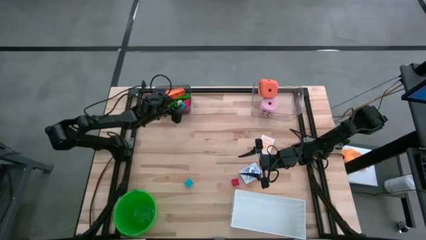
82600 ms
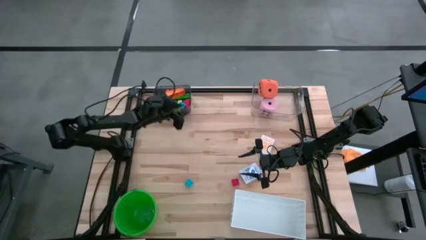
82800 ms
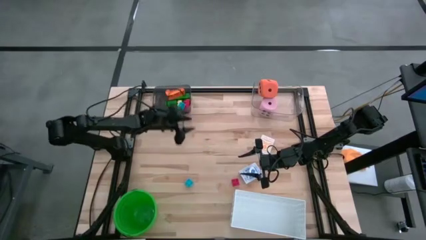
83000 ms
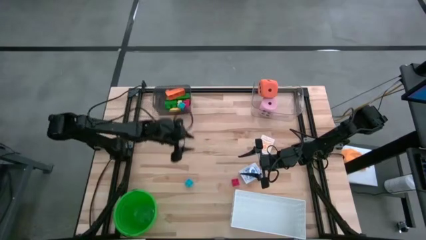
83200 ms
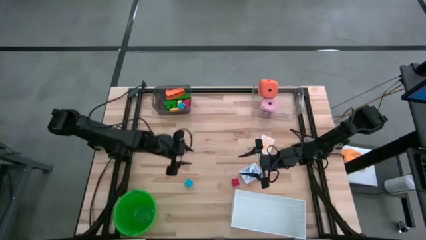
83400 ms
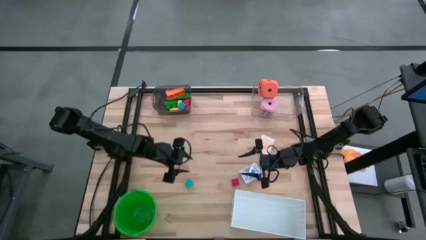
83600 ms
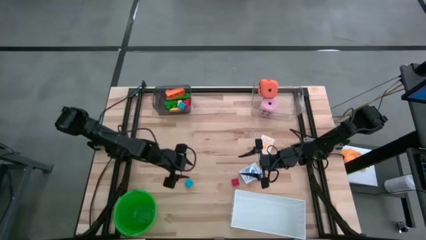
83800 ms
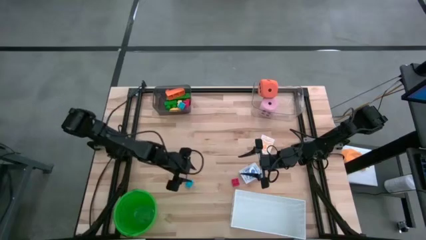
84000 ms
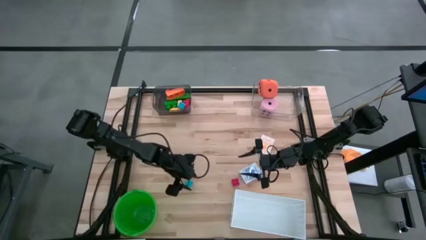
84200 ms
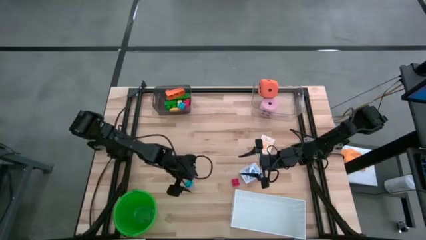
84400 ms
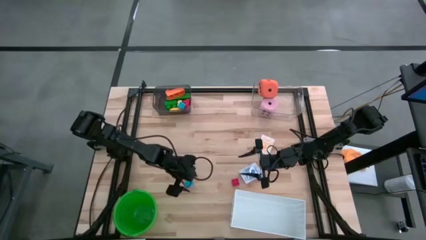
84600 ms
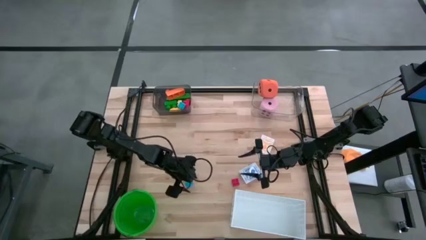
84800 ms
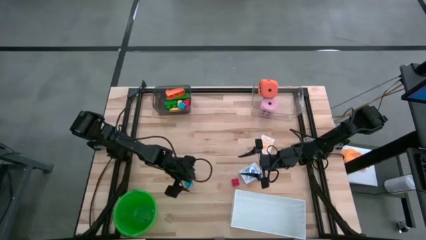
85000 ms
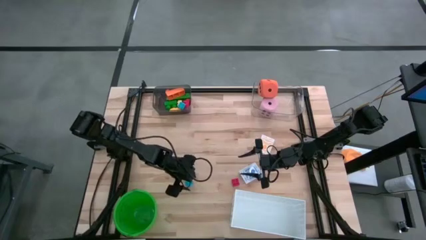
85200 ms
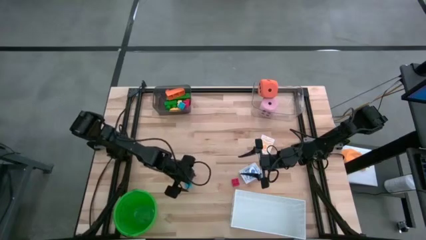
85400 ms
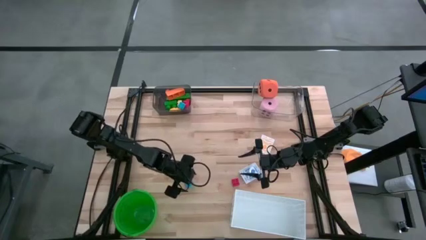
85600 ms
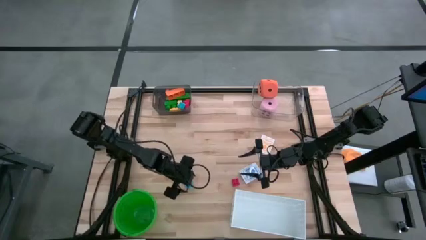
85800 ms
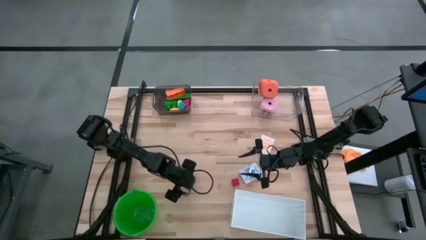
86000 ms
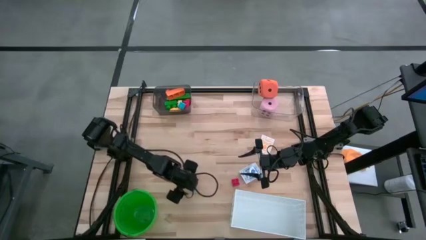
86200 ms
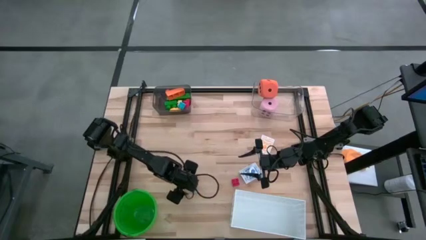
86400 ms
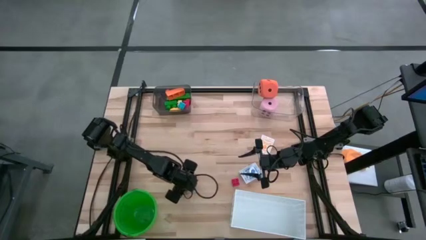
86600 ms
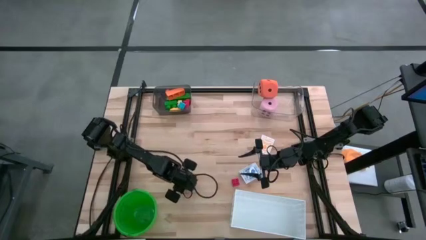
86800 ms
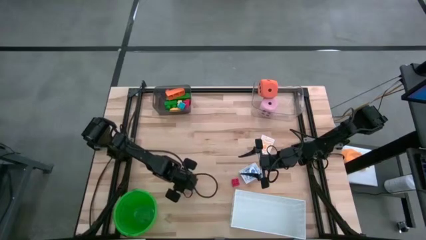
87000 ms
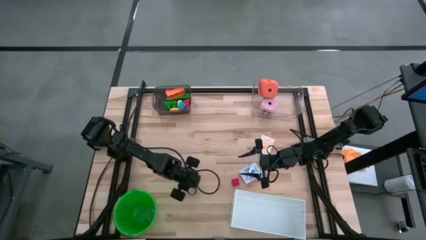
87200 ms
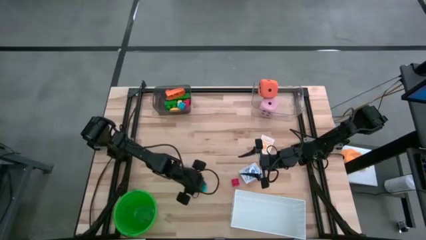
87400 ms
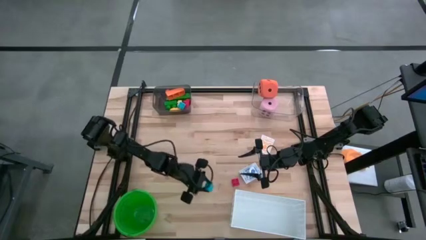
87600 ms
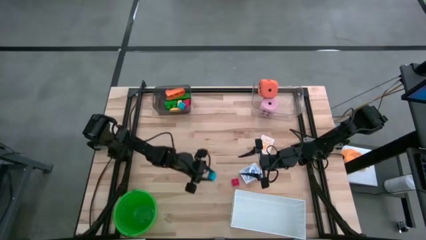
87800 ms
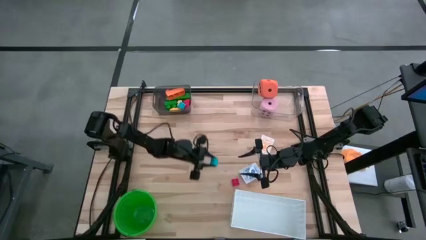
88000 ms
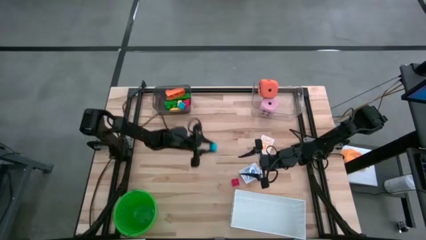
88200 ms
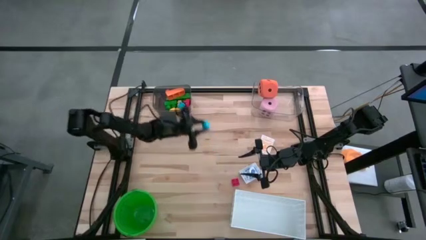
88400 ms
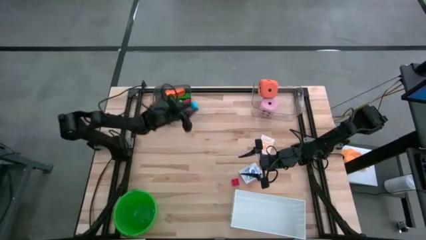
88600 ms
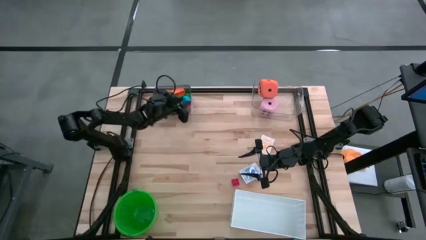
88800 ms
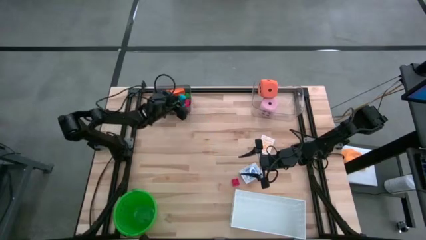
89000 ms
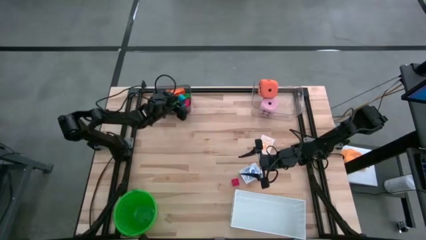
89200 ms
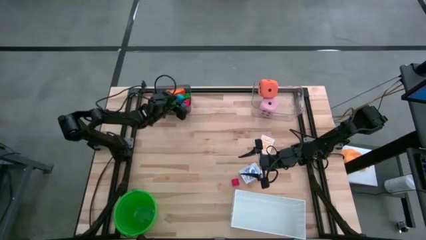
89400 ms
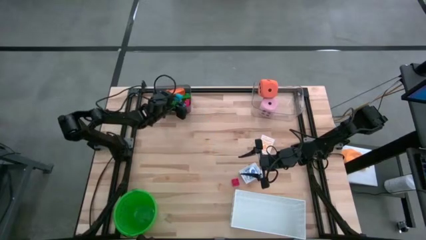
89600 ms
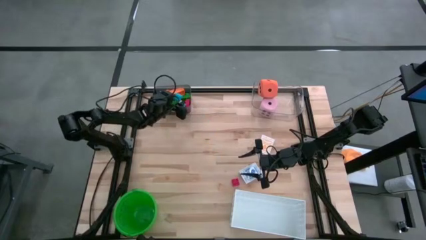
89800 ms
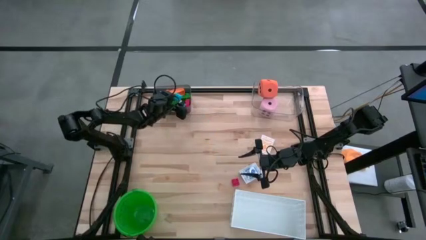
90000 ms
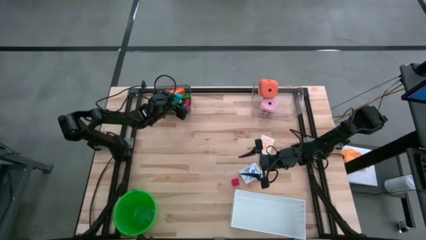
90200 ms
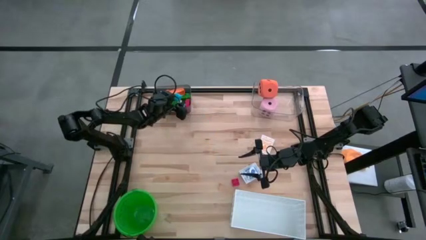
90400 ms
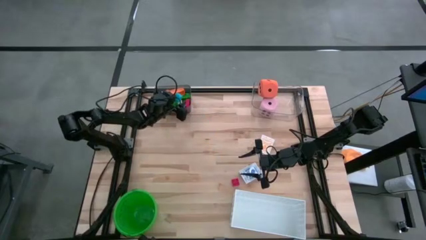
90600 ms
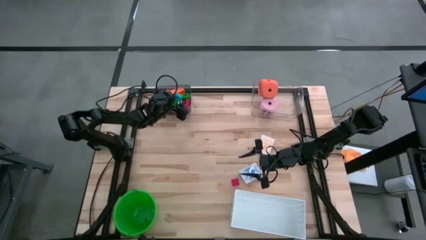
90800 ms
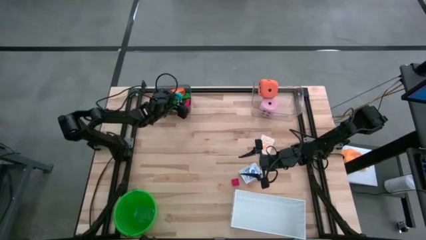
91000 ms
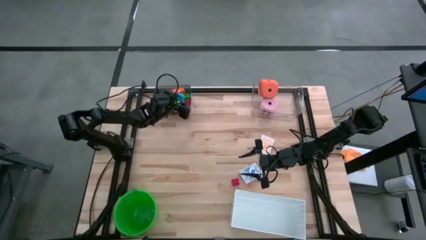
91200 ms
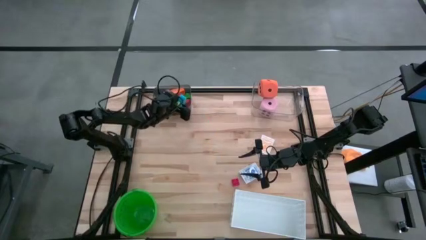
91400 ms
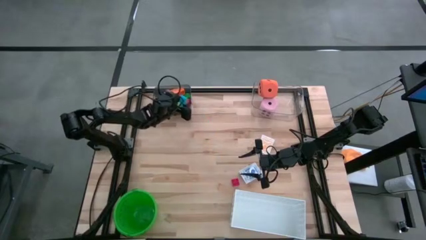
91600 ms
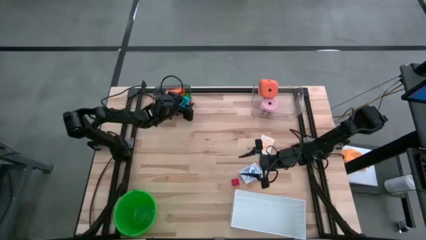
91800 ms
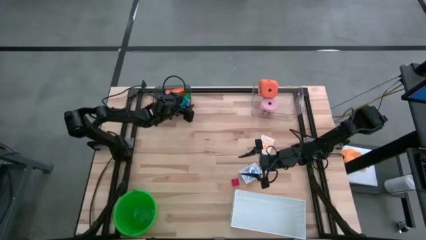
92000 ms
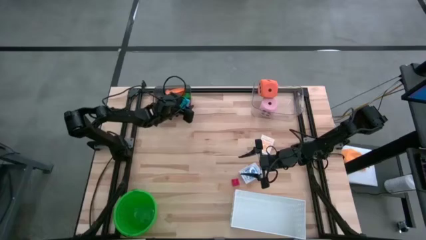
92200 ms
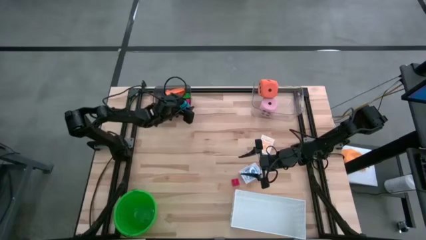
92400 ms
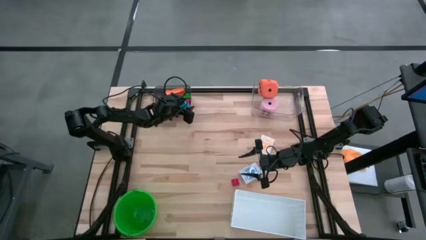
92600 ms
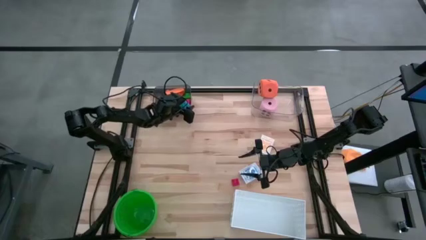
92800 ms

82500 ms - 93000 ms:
Task: Pick & Place Toys
Put the light blue game piece into the black bin

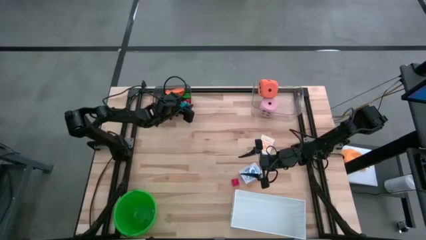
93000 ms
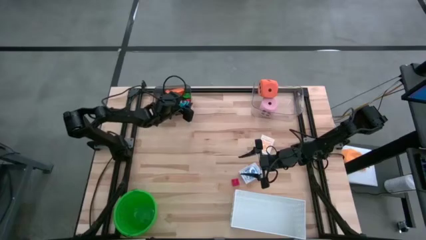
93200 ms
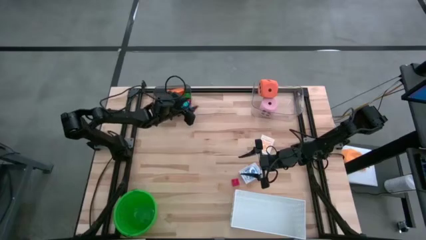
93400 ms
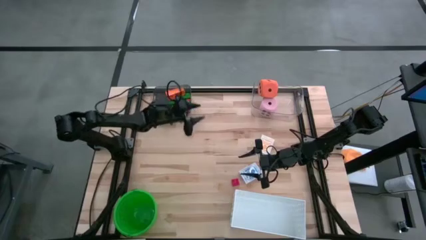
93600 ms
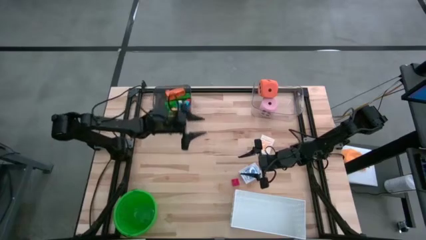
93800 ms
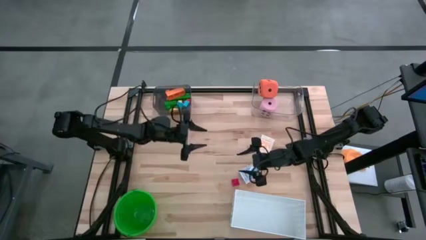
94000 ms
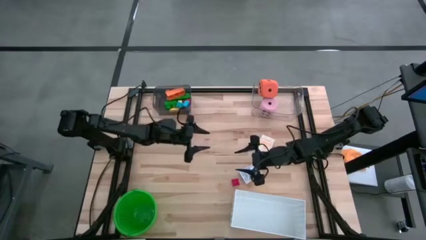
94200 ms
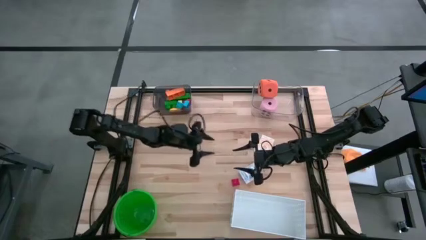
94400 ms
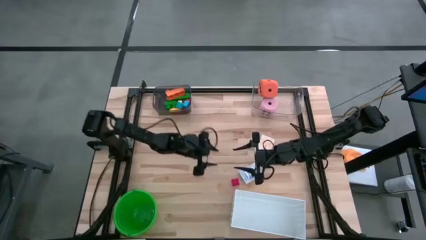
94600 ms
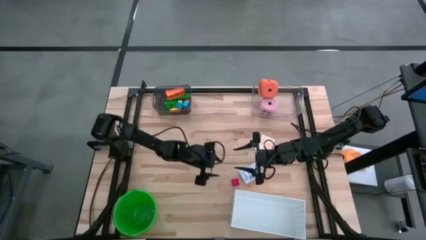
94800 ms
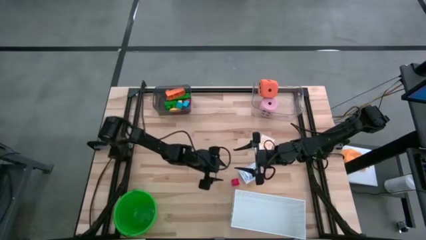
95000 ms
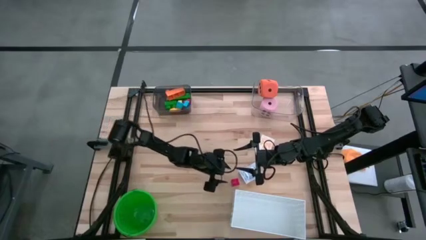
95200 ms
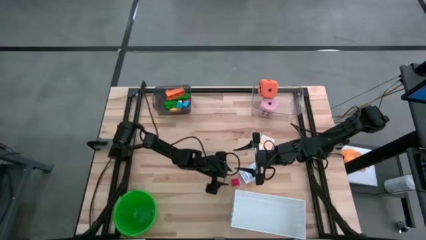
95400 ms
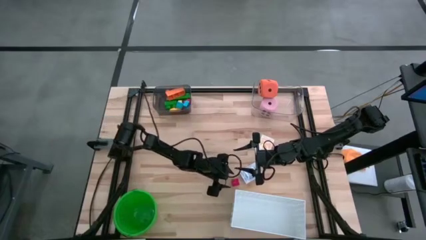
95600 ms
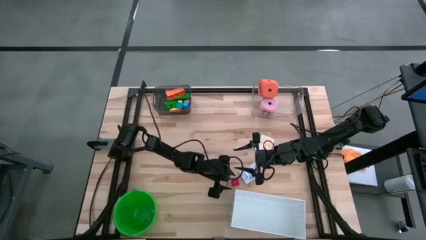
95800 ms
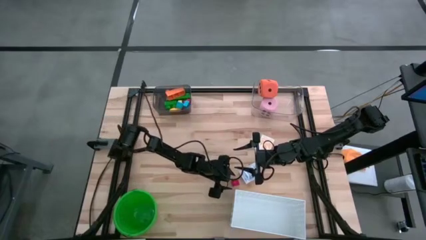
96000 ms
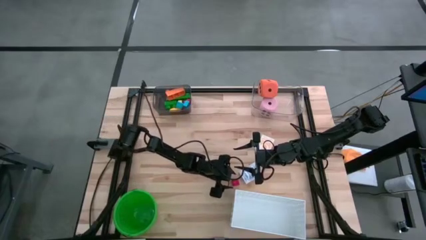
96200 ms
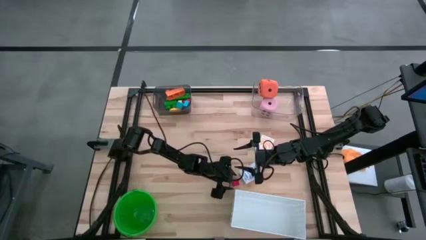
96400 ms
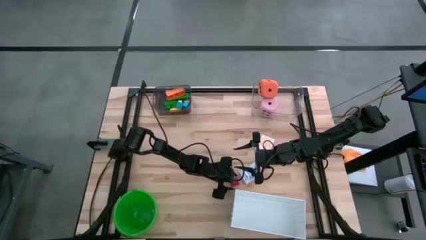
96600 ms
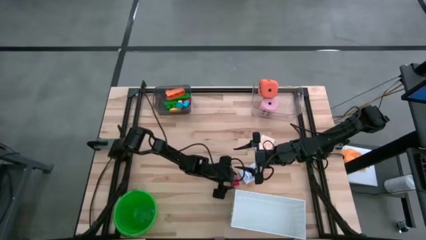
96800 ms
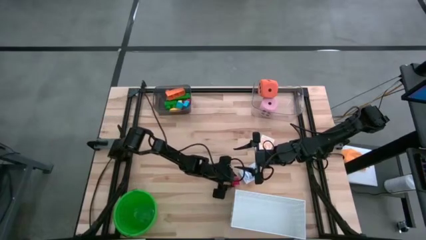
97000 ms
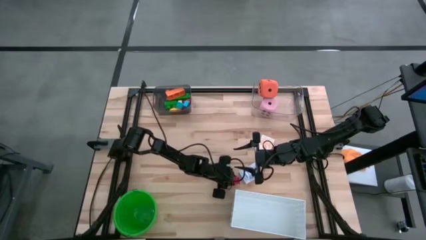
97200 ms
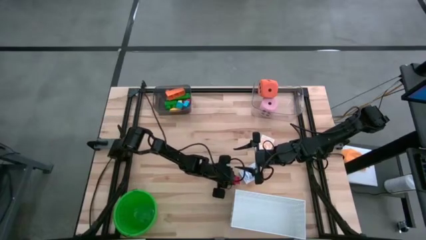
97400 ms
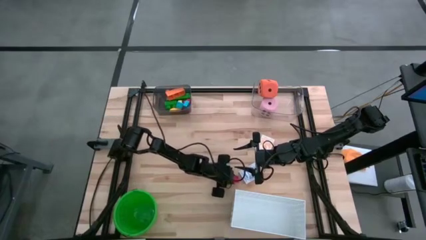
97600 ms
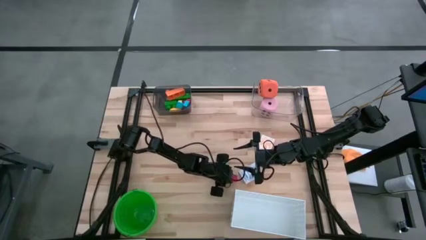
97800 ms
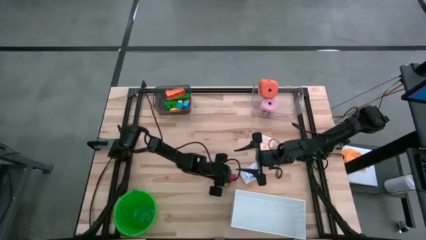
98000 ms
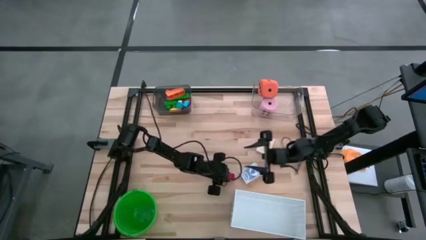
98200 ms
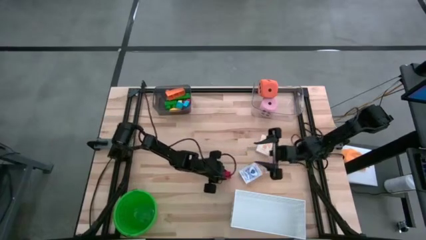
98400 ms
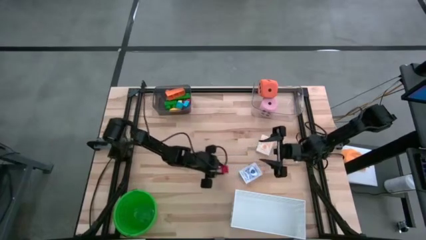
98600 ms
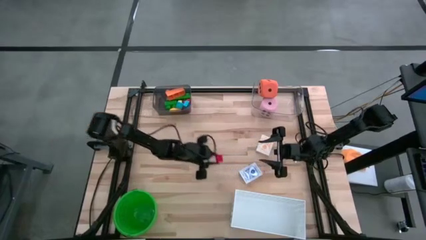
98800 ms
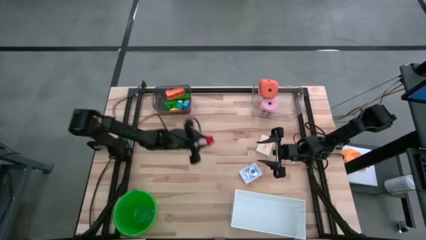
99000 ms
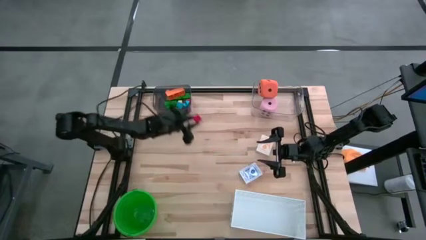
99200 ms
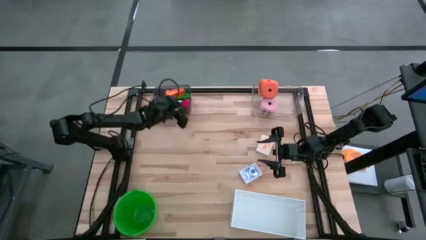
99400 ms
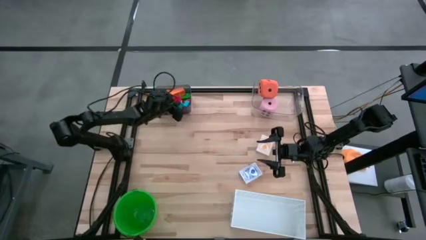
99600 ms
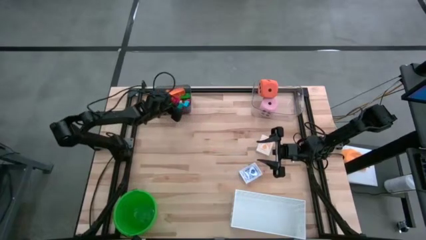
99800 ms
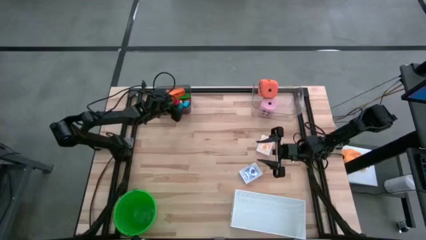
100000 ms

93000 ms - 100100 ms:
Put the red game piece into the black bin
